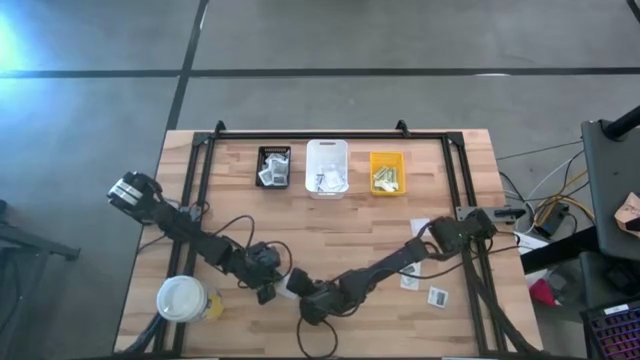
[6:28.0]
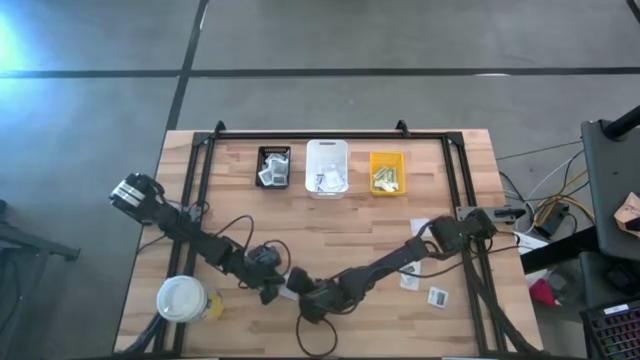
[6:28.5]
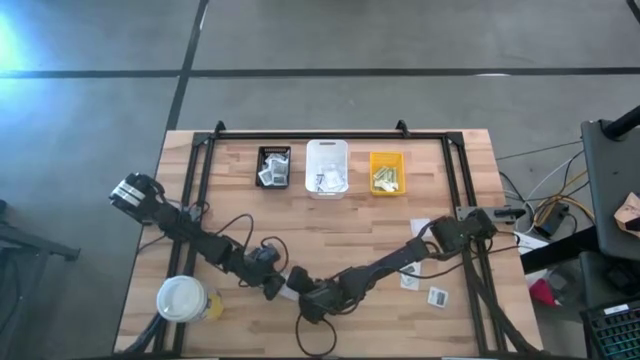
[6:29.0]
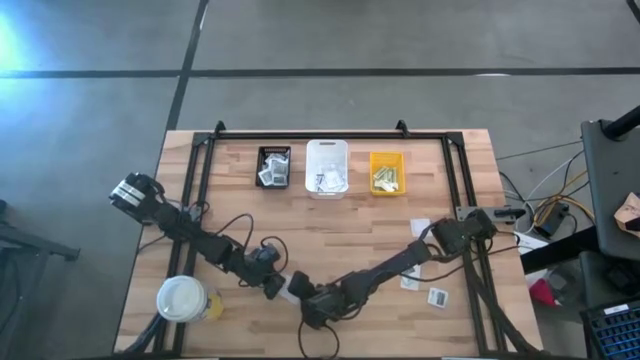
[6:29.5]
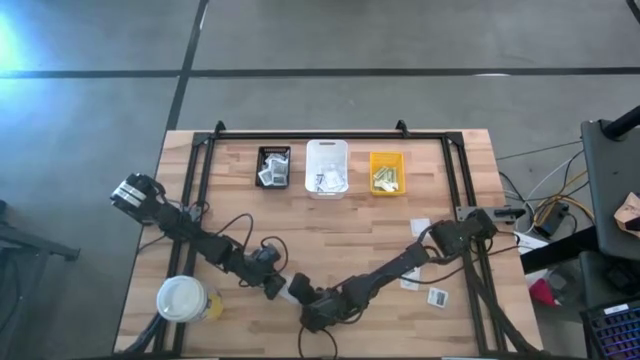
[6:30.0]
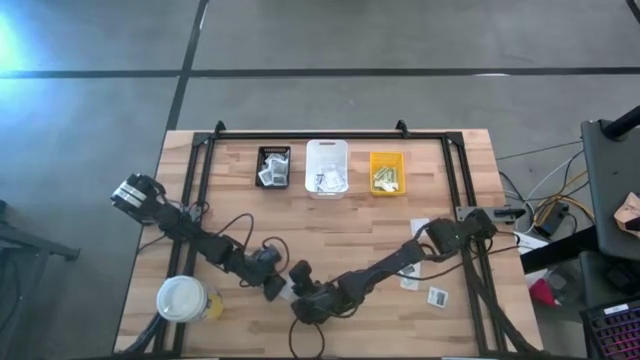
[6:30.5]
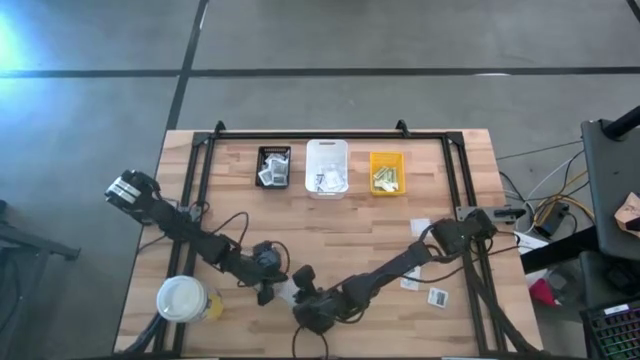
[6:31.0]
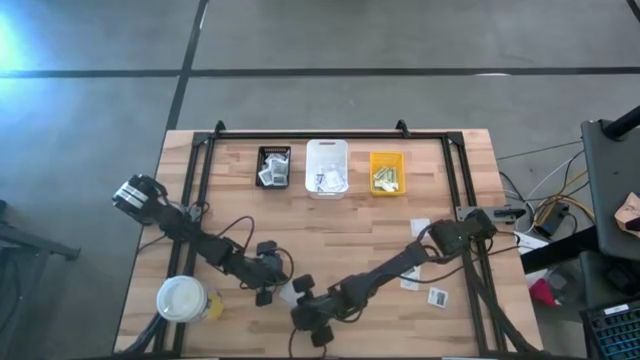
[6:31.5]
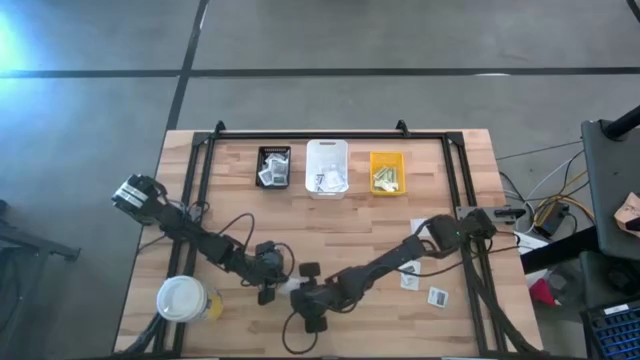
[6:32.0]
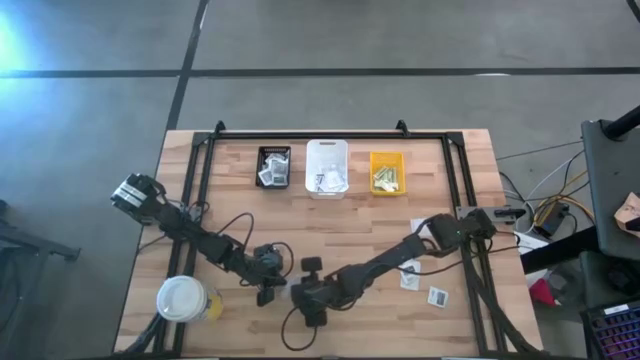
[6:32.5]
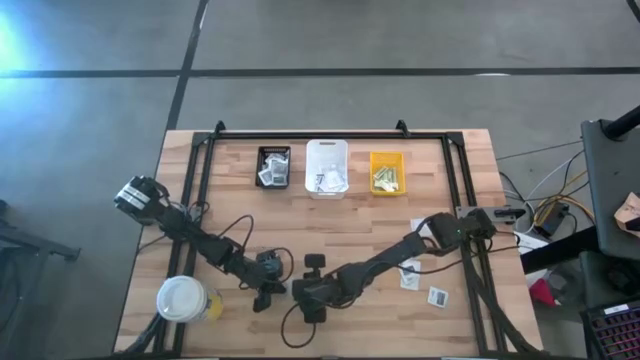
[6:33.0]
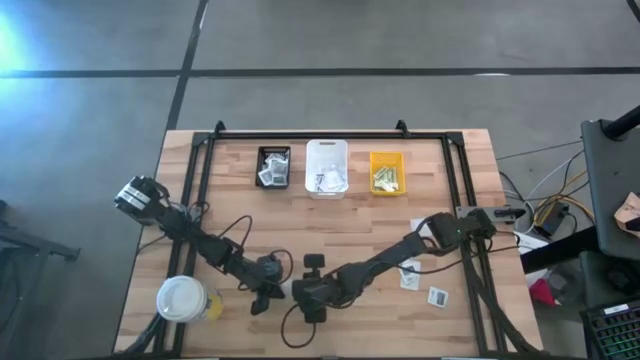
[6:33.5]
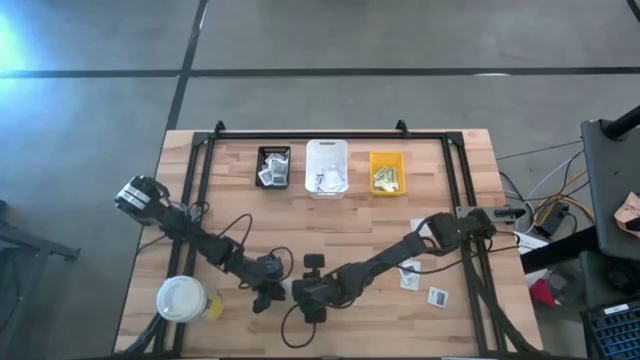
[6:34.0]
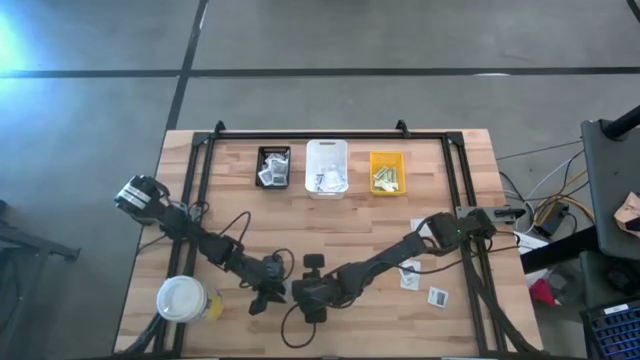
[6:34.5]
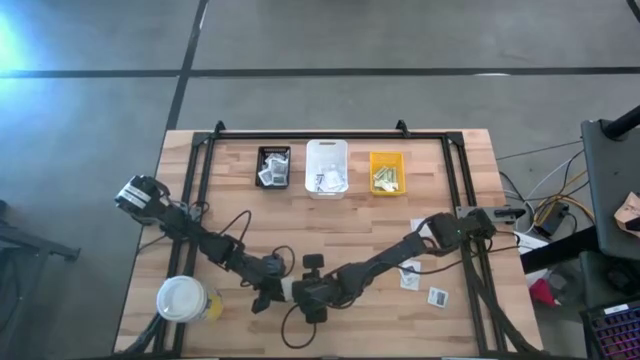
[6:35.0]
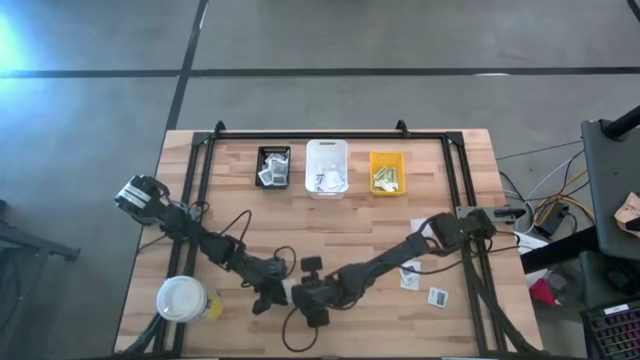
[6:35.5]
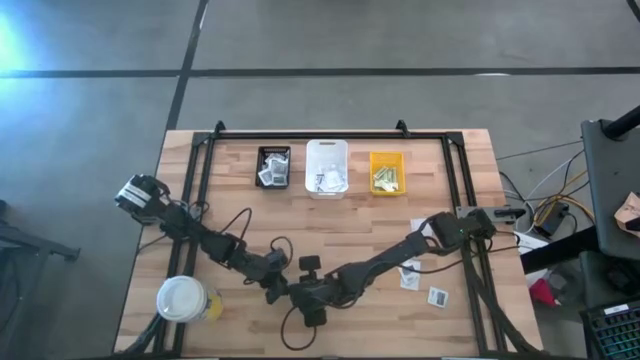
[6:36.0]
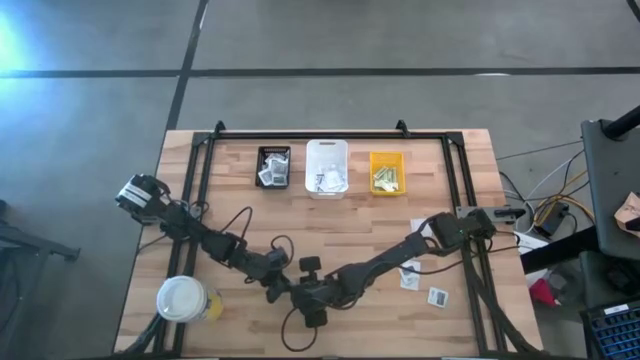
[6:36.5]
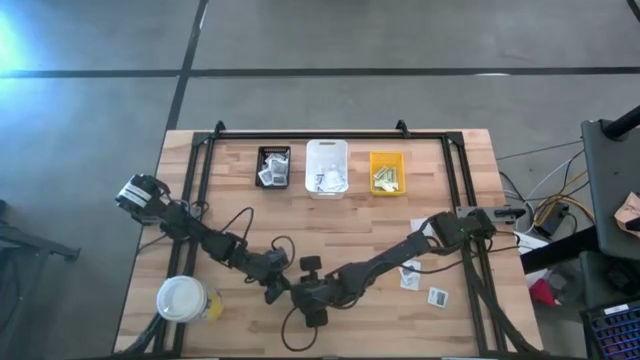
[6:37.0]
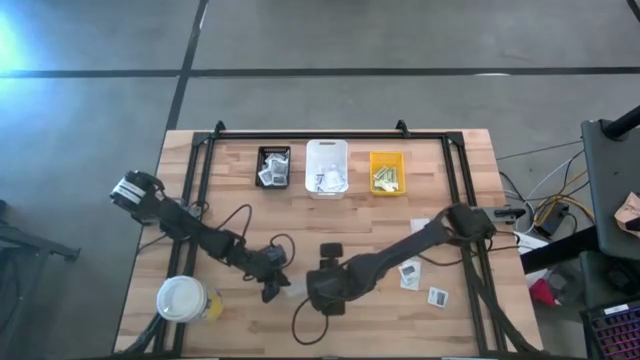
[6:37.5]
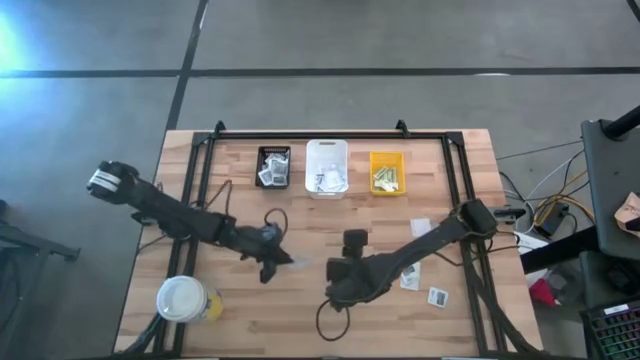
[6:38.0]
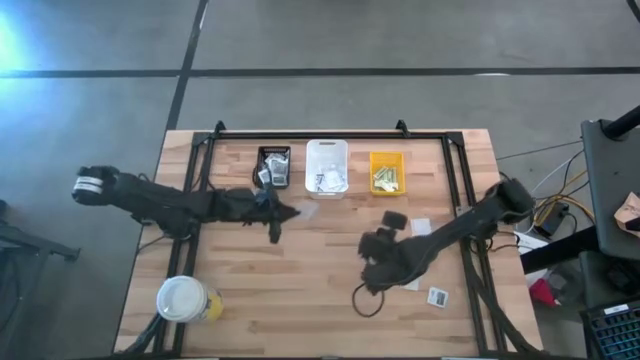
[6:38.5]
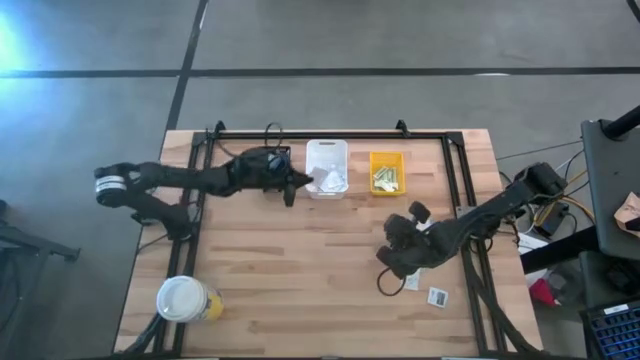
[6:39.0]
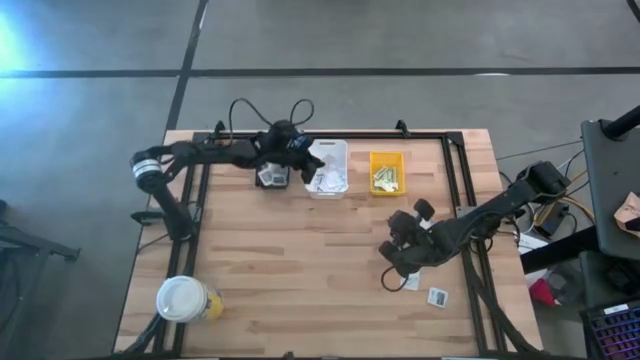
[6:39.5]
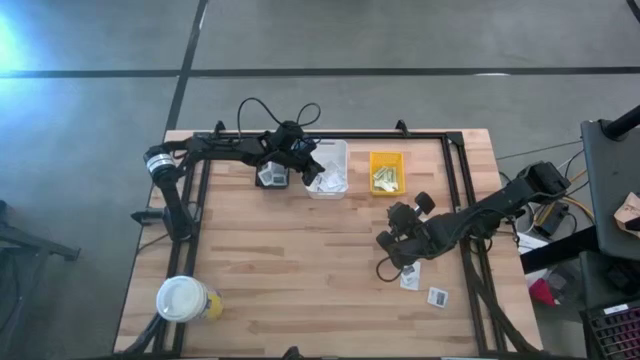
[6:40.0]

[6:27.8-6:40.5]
Task: Pick & Place First Aid Supplies
Put the blue bandage into the white bin

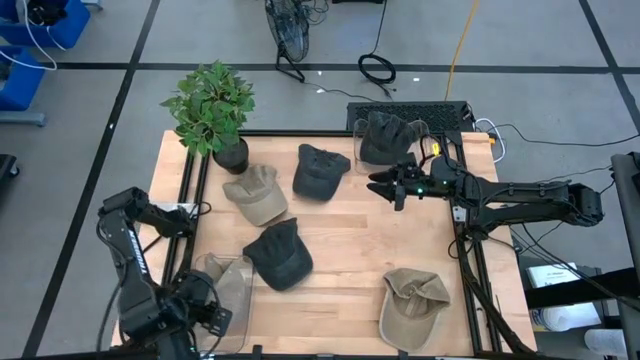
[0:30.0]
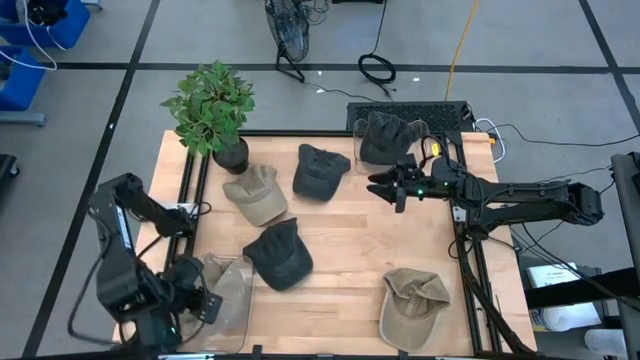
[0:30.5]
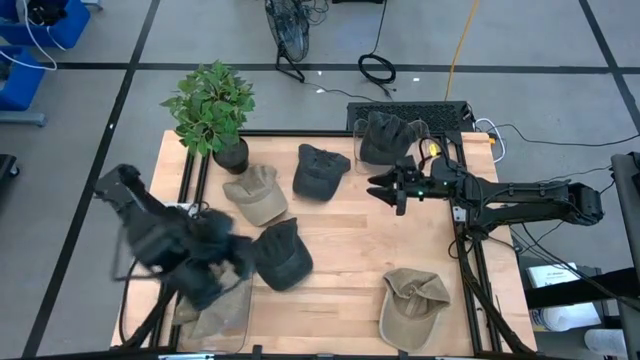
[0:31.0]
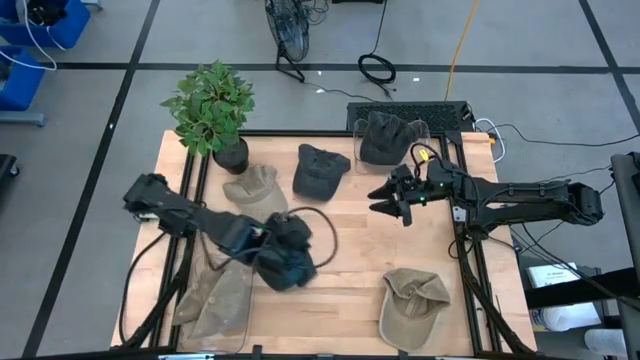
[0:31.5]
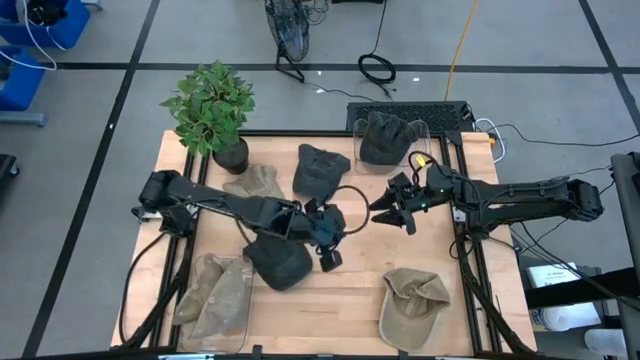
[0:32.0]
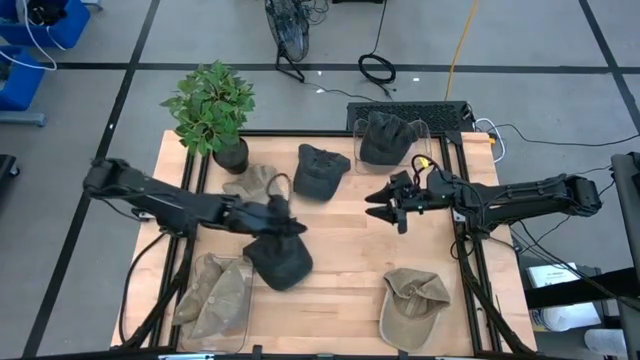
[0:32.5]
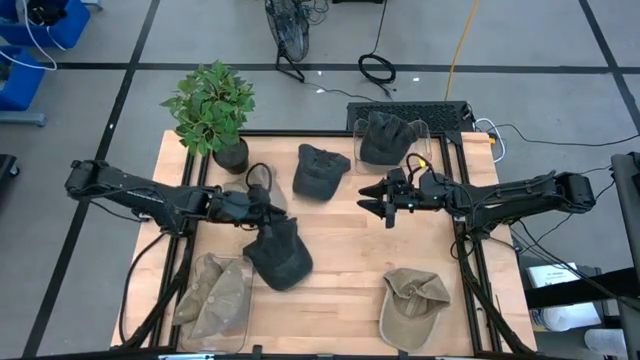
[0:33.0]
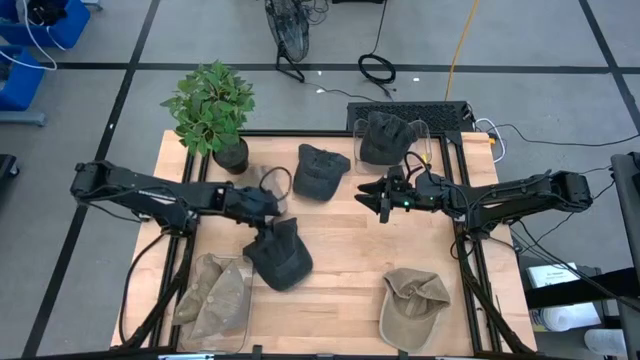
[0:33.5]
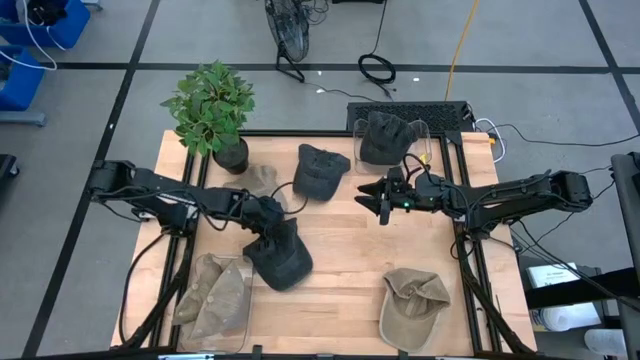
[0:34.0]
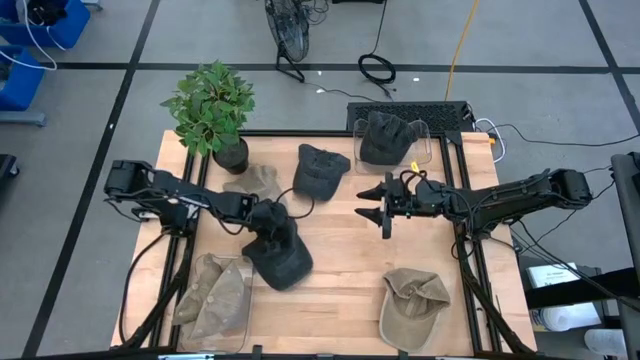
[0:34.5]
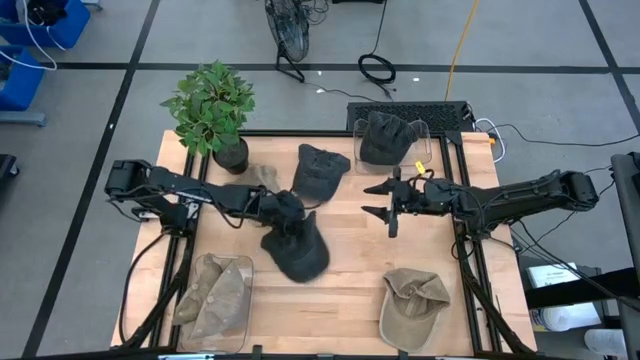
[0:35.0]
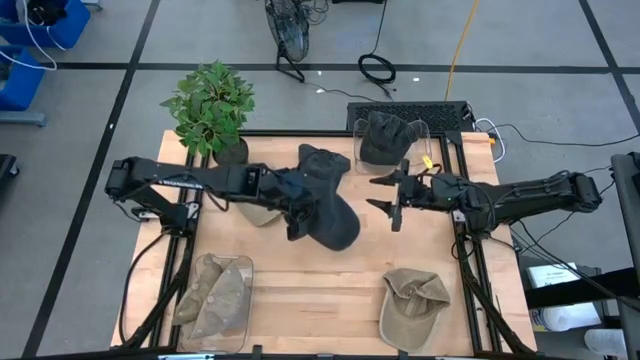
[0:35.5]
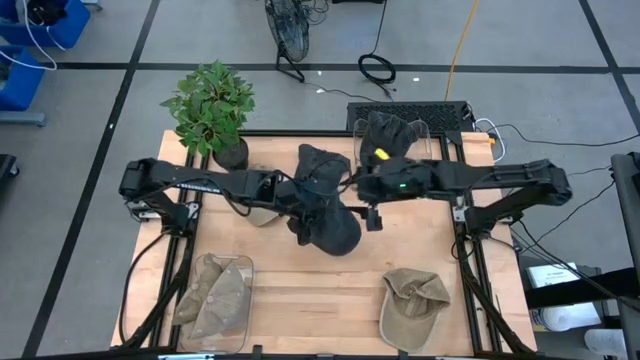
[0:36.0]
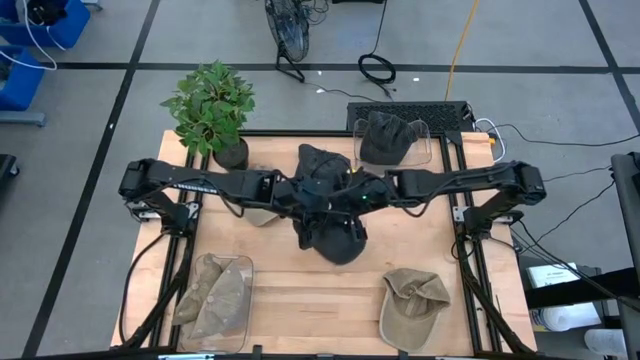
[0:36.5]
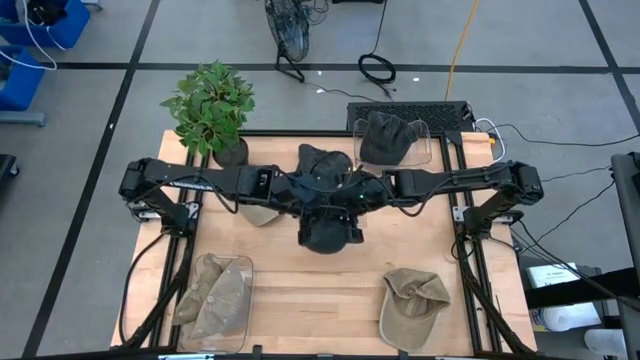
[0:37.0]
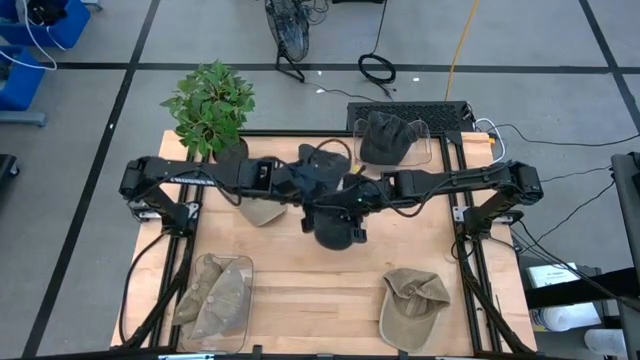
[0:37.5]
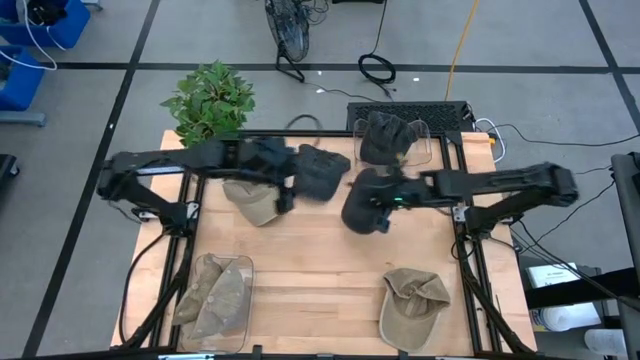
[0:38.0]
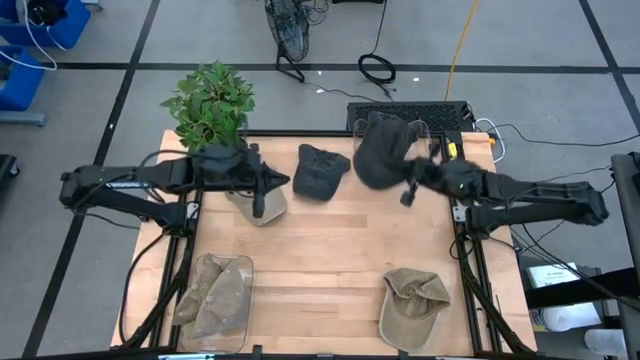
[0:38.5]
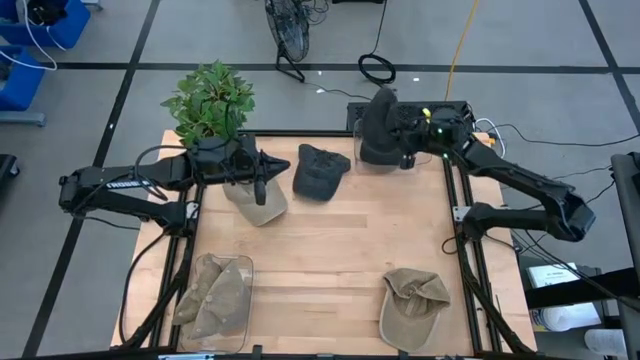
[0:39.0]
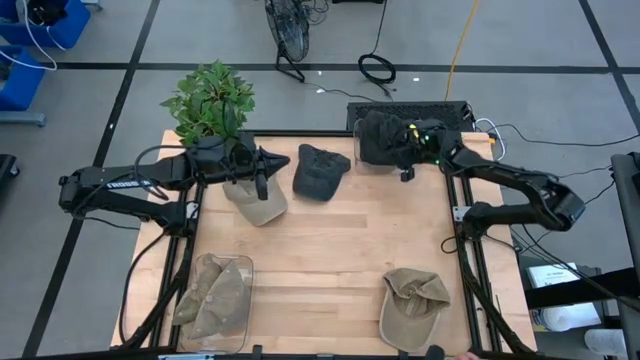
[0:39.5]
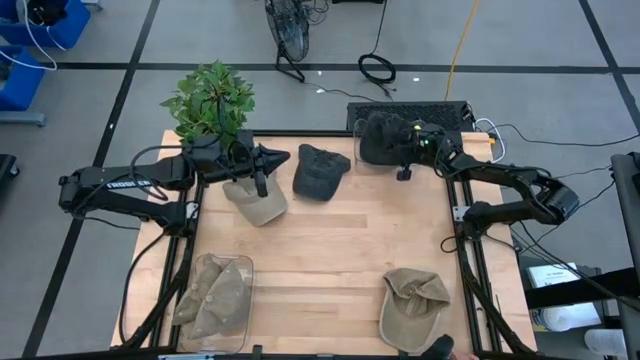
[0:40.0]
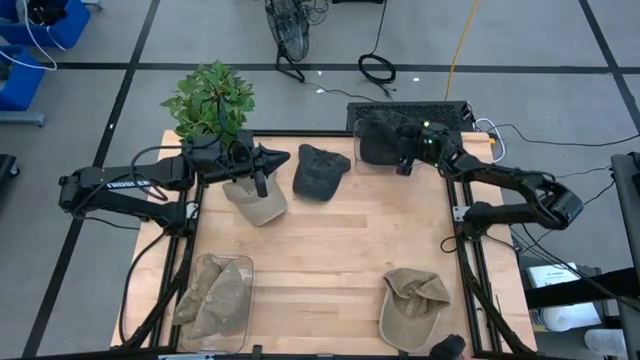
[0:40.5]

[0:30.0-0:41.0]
Task: Pick & Place hat
Put the black cap into the top transparent bin
